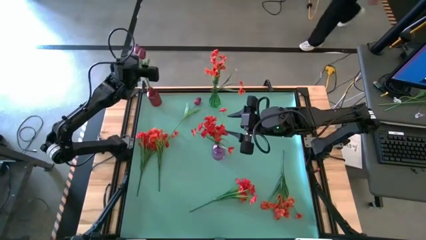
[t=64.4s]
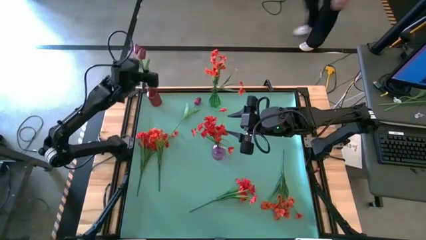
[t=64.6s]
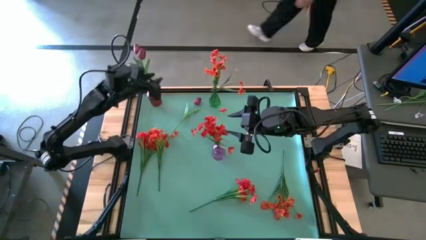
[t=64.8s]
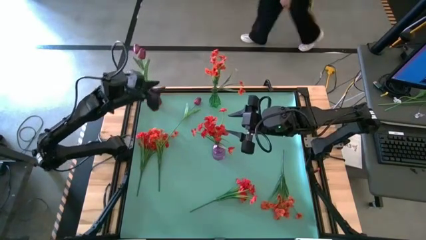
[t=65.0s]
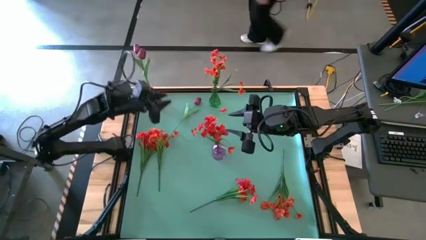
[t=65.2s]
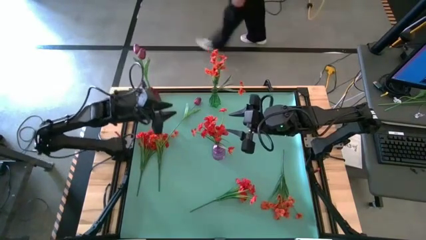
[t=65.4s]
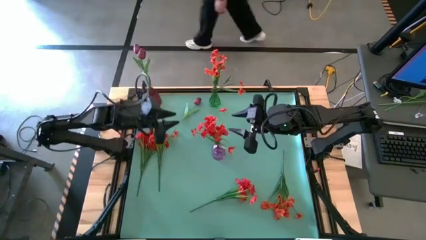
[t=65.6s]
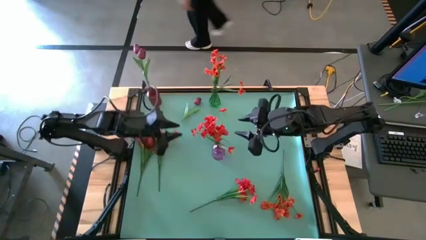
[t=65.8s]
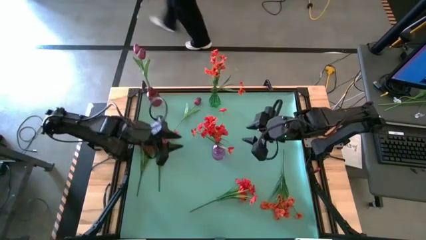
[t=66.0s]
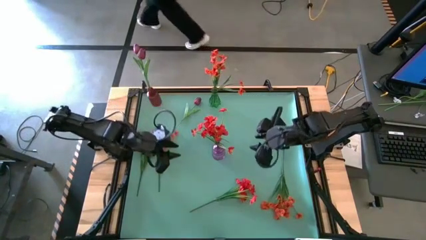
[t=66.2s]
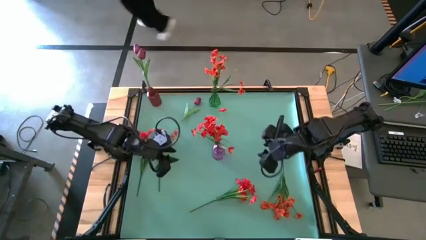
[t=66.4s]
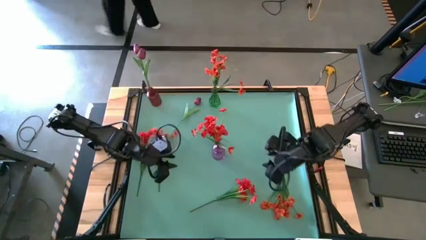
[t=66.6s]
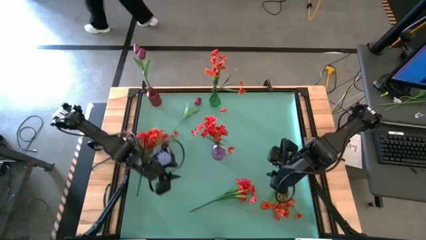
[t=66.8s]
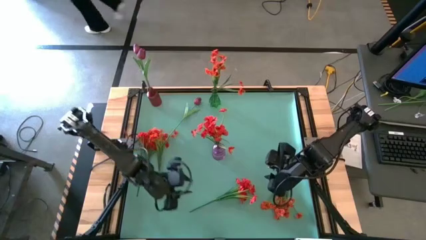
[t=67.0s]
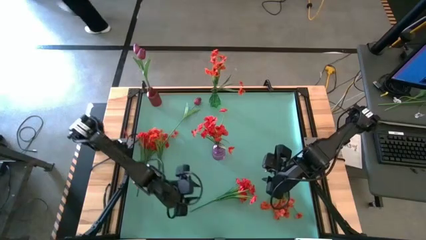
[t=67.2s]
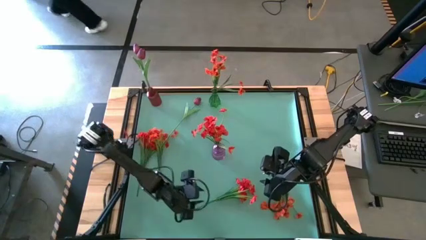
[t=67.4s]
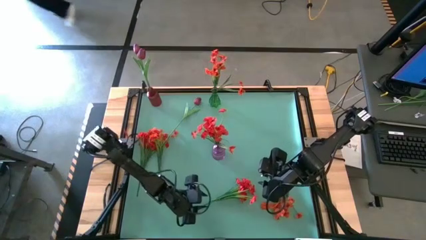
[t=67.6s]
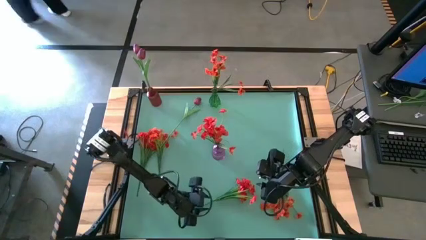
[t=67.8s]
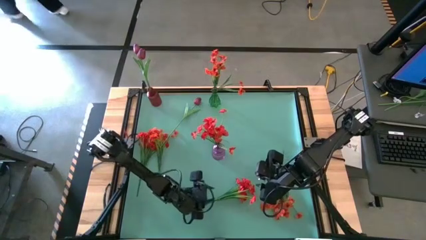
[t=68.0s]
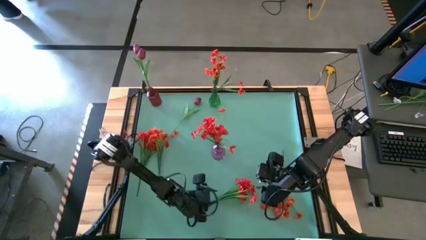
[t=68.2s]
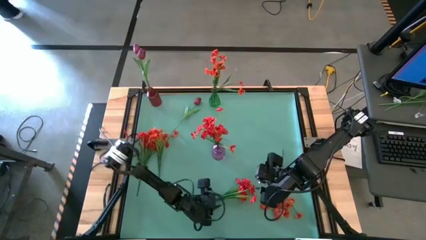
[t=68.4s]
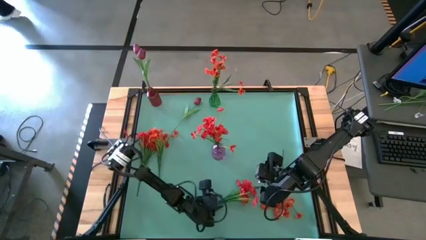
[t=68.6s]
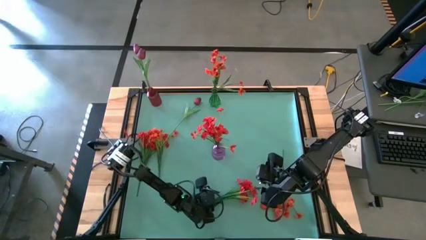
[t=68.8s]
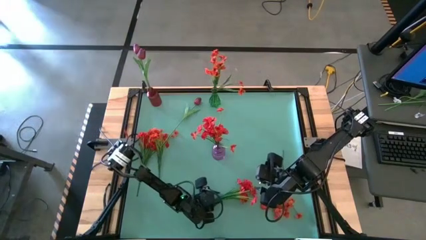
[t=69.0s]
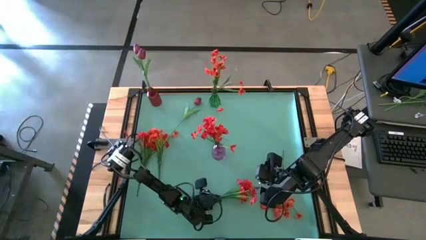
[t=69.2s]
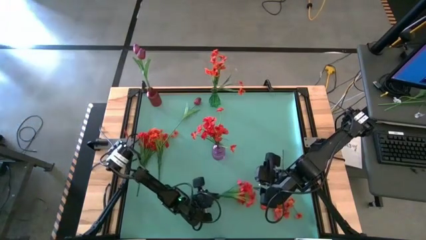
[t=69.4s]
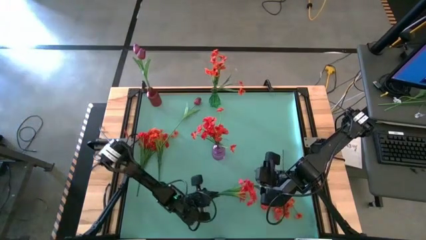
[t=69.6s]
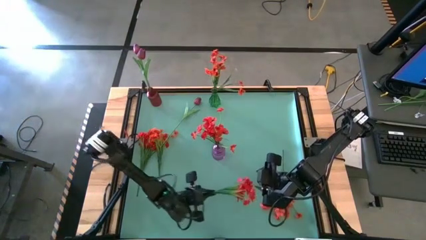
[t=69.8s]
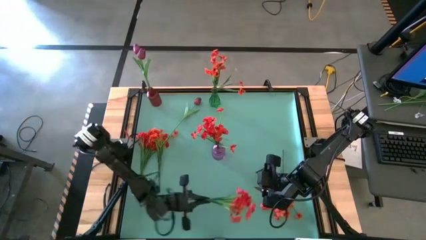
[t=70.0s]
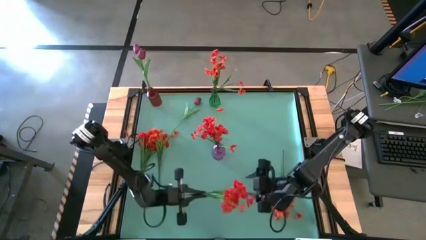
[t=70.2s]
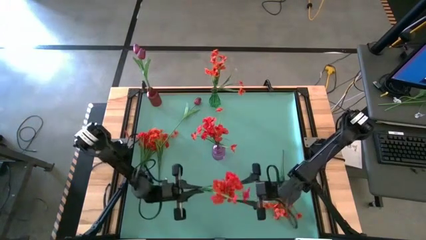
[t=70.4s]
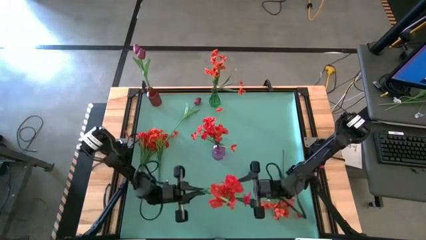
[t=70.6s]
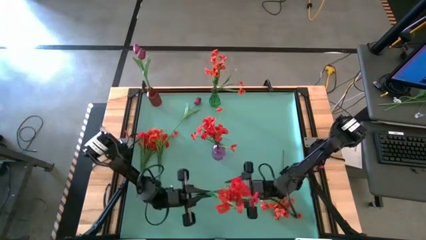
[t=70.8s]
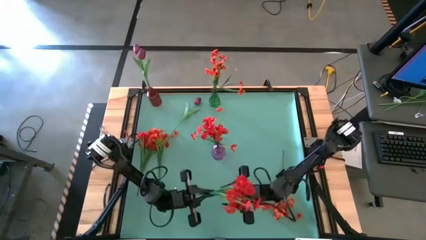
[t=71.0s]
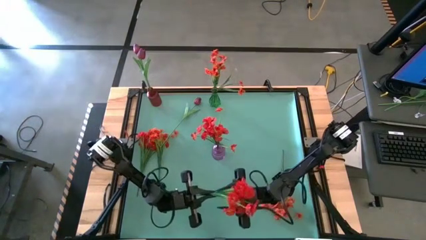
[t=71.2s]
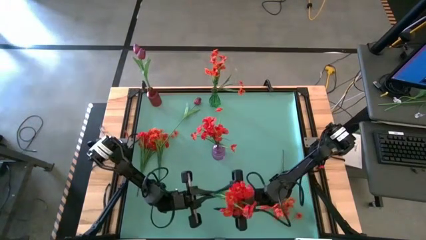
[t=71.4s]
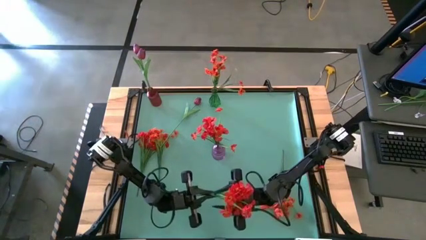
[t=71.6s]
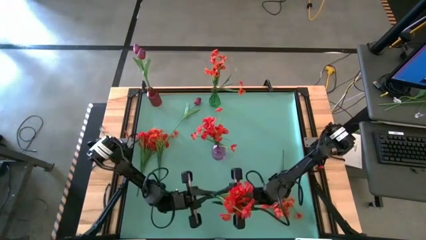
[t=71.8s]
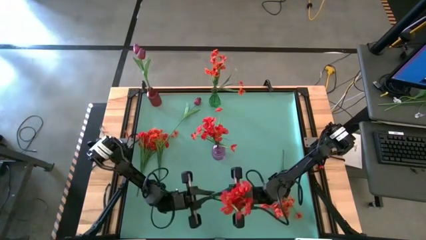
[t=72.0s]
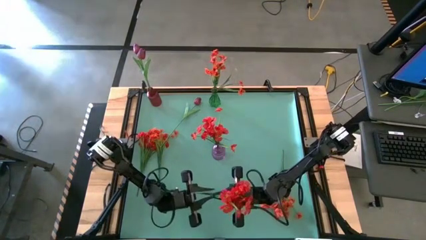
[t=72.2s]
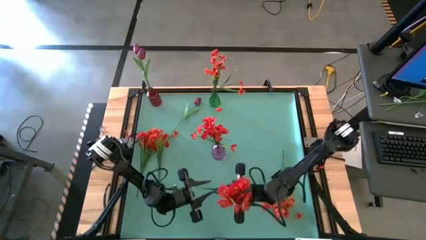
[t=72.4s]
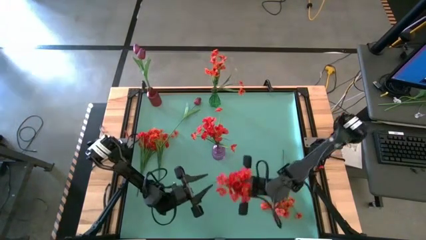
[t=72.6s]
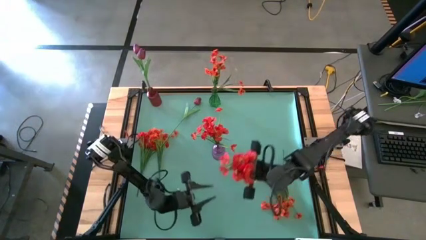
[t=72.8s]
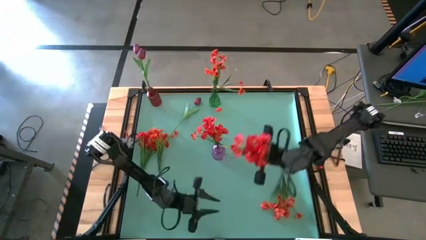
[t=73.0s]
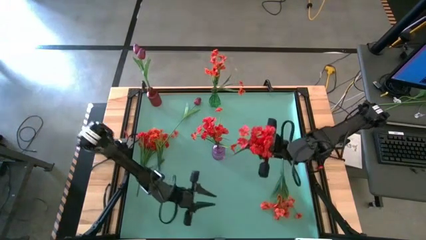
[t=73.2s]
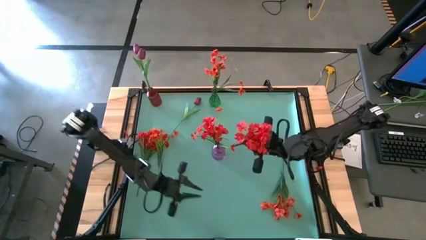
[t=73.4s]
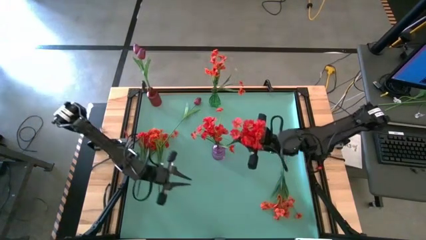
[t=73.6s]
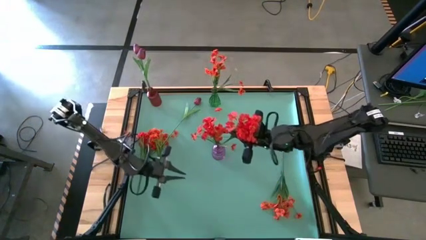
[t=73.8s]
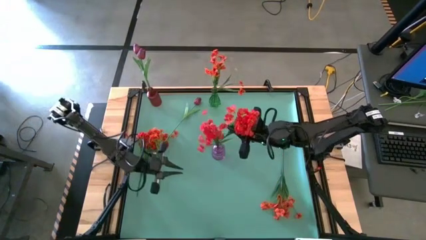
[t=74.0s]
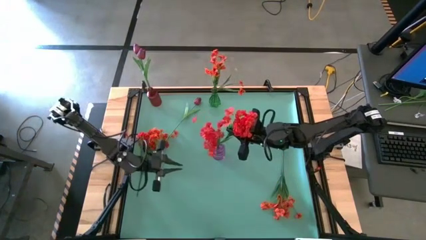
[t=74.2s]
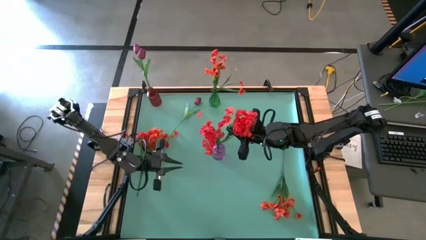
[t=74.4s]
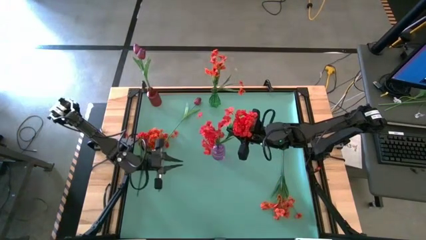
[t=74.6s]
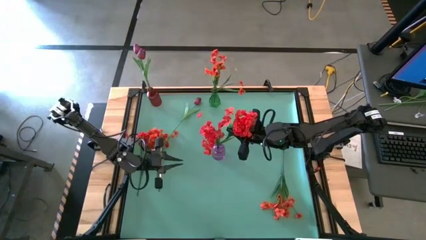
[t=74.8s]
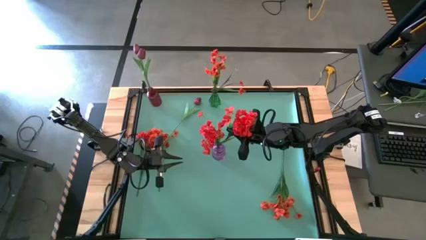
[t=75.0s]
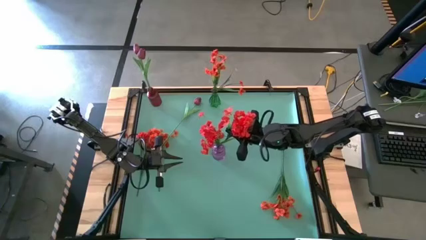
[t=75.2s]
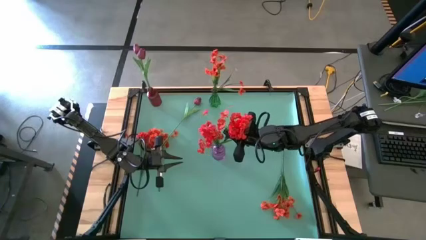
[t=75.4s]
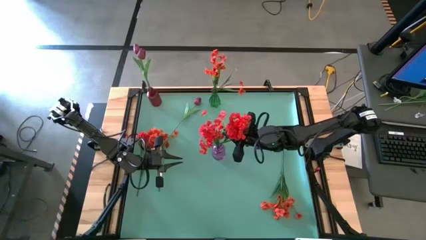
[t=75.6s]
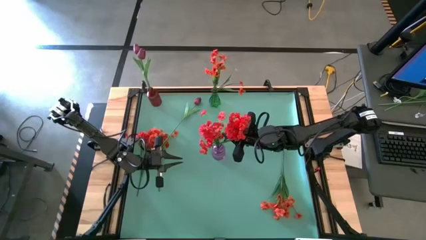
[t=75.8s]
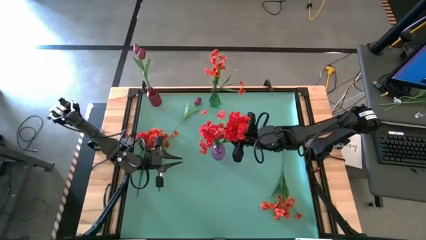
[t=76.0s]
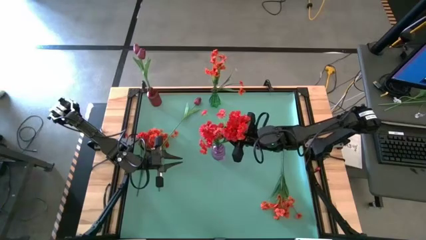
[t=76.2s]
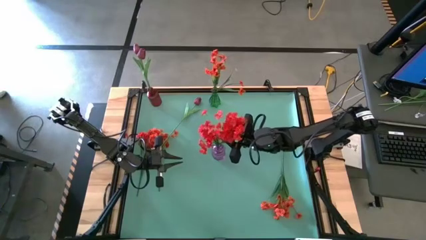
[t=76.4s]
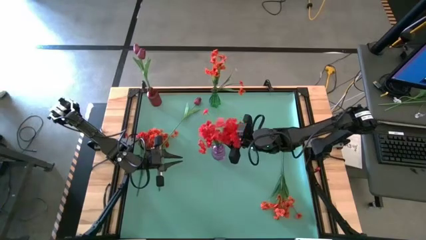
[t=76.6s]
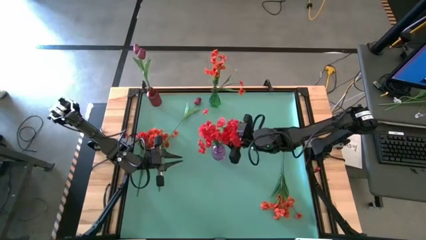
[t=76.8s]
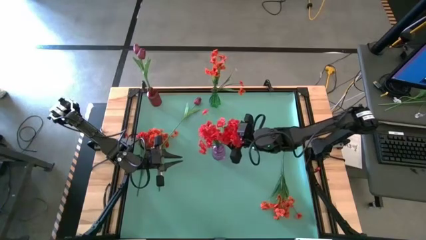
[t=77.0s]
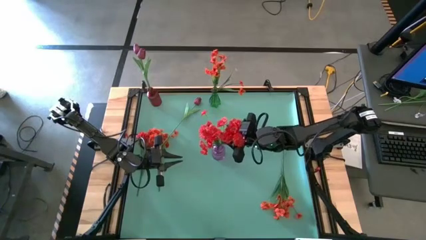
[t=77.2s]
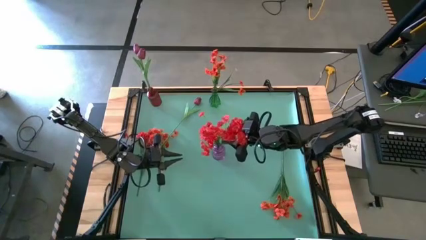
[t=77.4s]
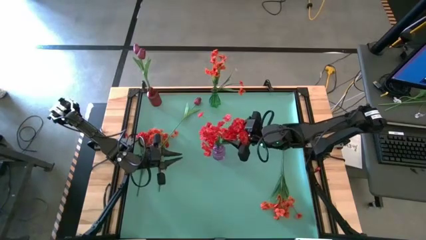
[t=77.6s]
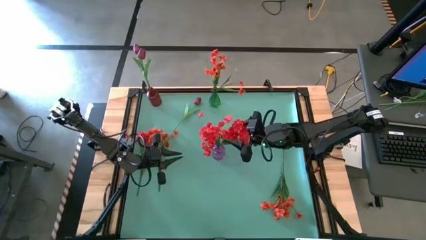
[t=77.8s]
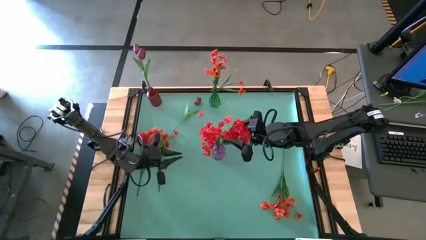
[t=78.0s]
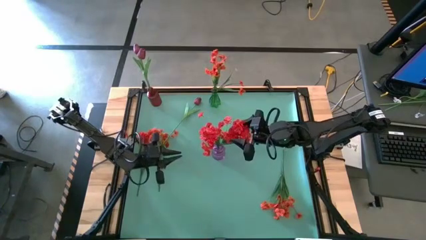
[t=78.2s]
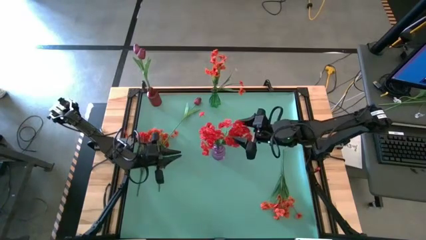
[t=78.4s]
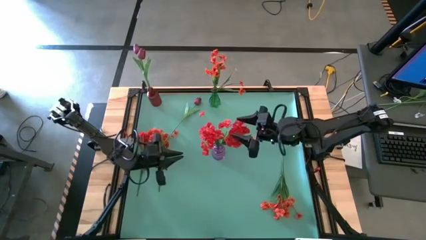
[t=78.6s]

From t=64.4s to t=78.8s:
Task: Sort flowers into vase by color
Put the orange flowers into the purple vase
